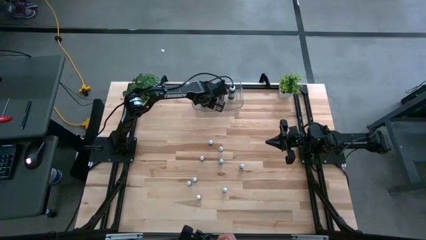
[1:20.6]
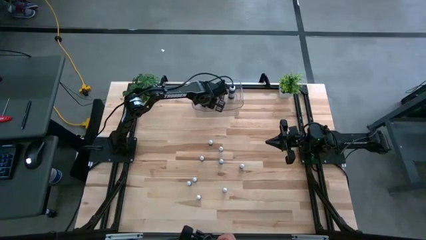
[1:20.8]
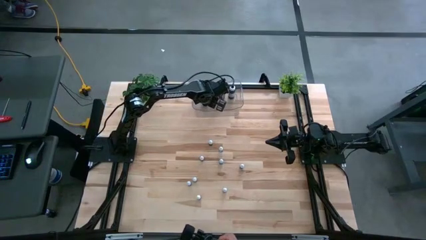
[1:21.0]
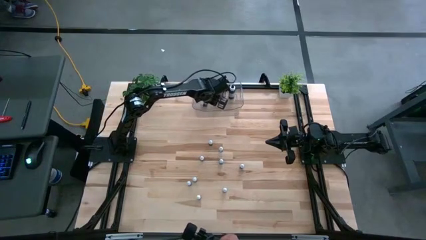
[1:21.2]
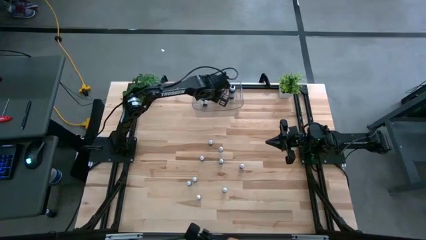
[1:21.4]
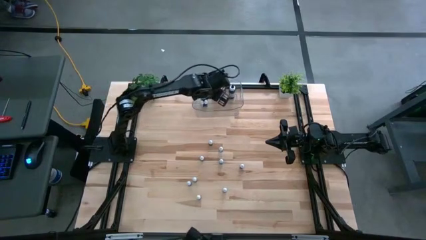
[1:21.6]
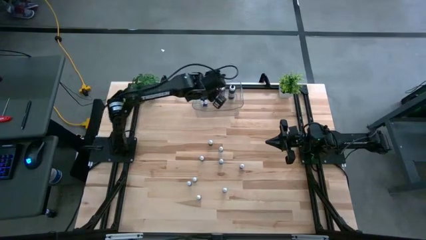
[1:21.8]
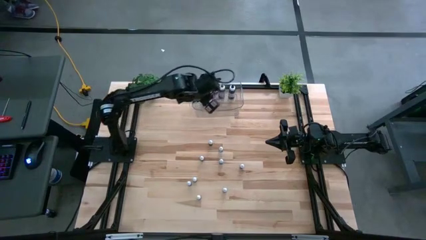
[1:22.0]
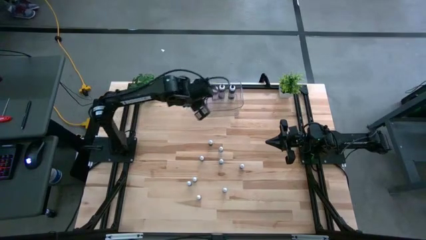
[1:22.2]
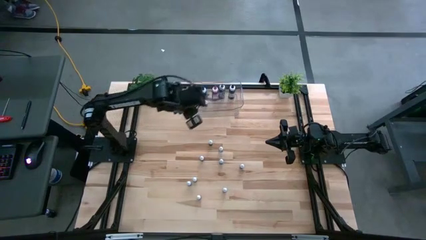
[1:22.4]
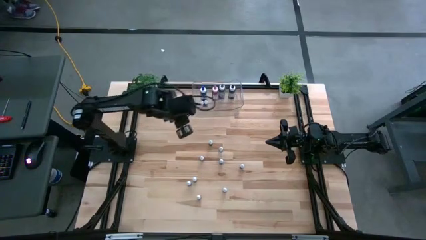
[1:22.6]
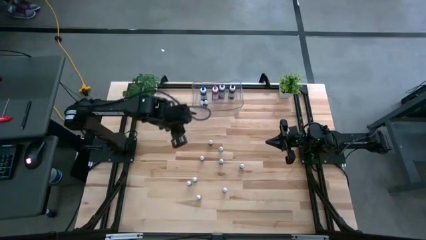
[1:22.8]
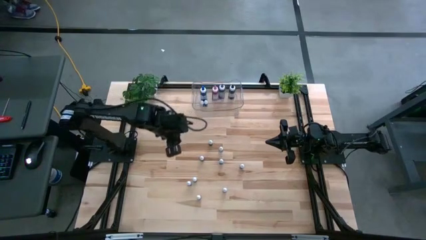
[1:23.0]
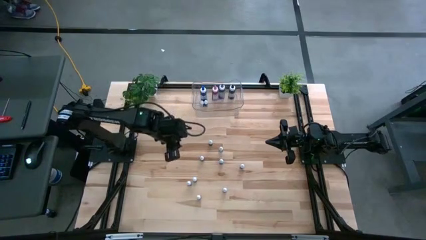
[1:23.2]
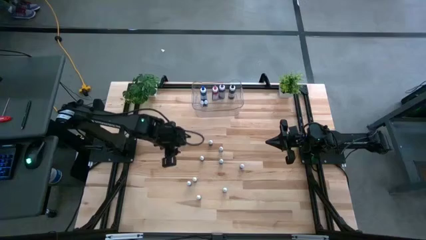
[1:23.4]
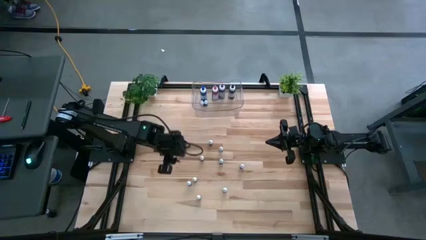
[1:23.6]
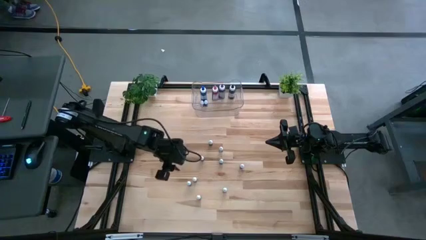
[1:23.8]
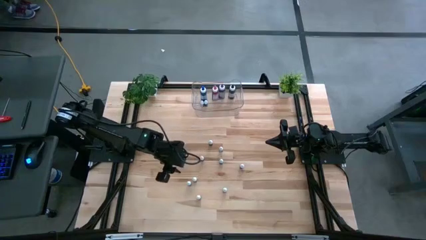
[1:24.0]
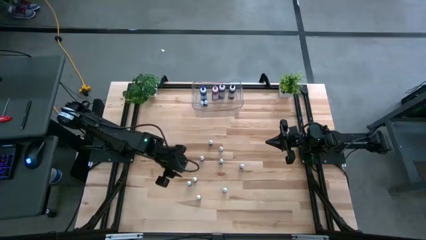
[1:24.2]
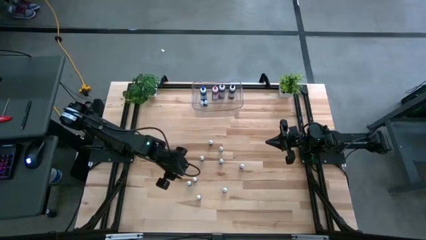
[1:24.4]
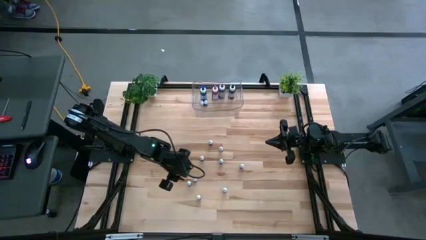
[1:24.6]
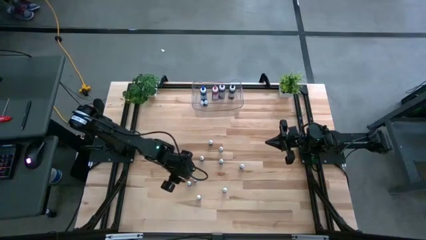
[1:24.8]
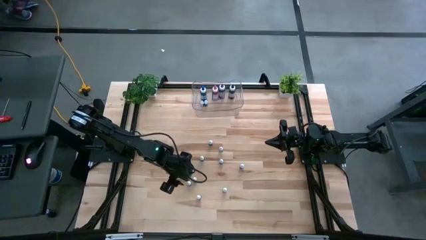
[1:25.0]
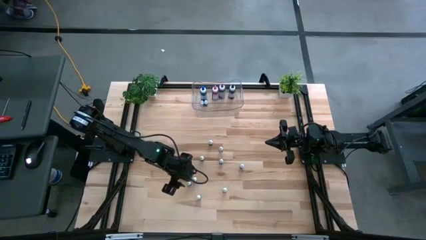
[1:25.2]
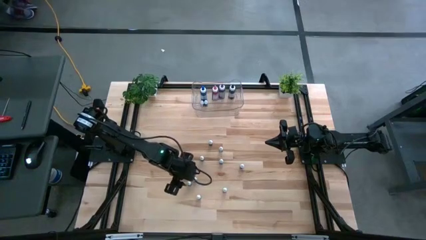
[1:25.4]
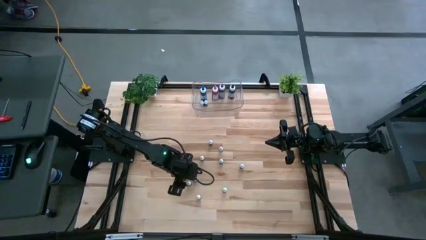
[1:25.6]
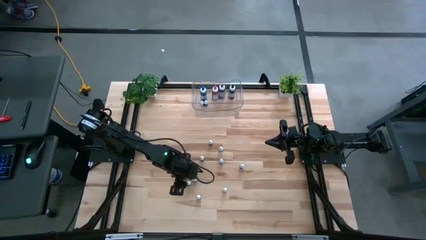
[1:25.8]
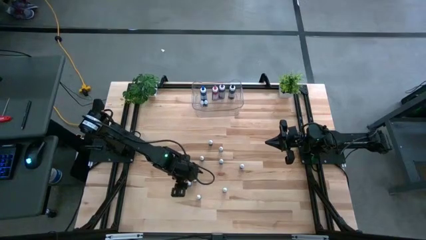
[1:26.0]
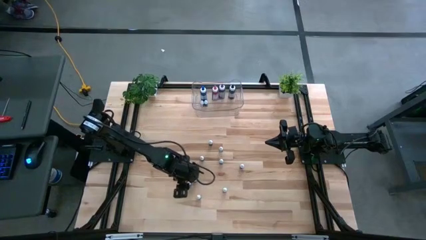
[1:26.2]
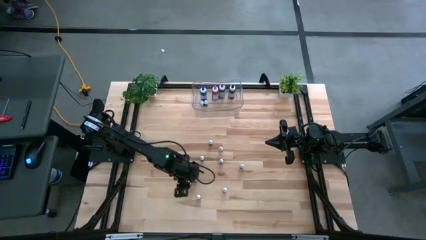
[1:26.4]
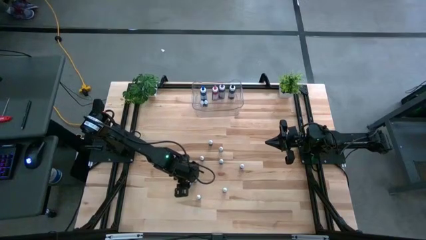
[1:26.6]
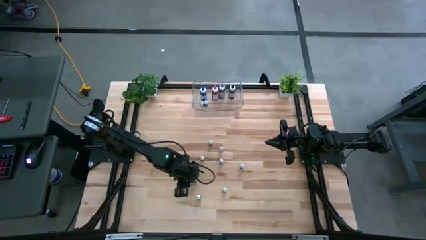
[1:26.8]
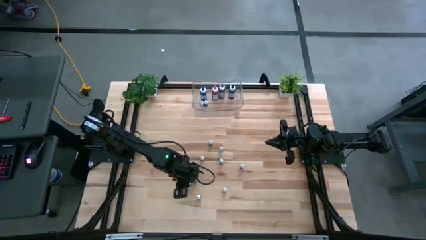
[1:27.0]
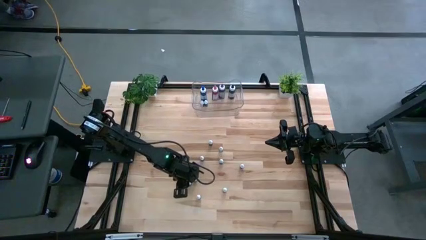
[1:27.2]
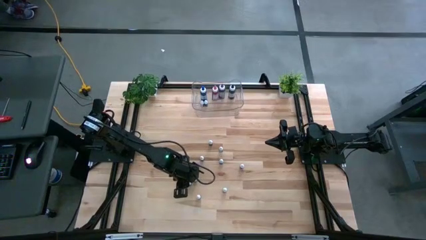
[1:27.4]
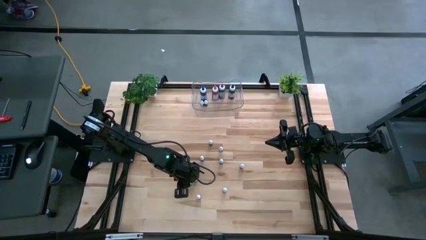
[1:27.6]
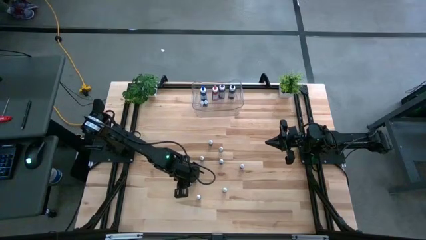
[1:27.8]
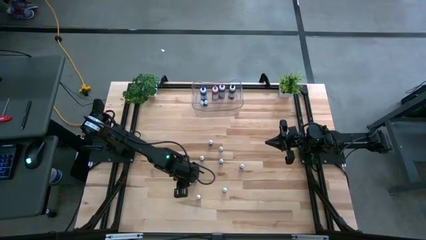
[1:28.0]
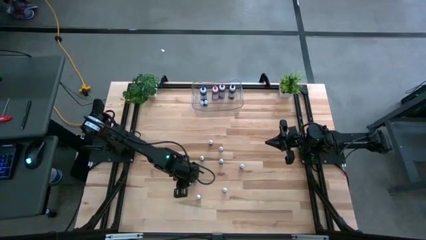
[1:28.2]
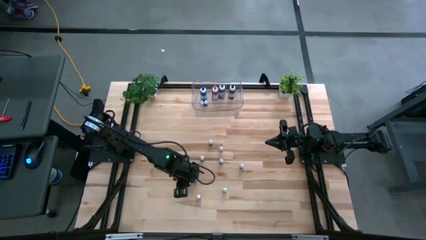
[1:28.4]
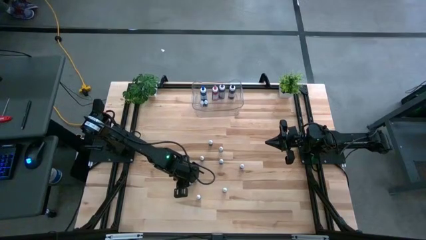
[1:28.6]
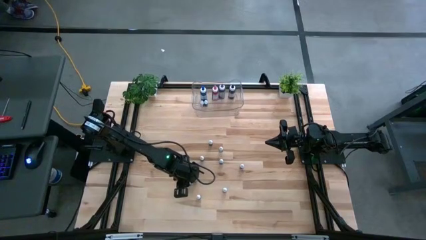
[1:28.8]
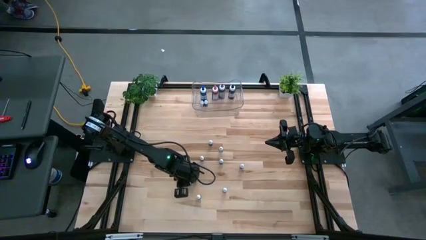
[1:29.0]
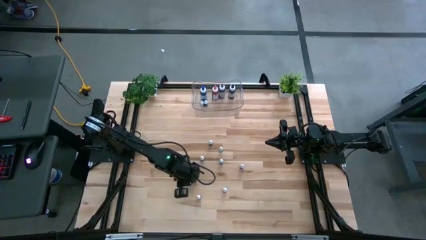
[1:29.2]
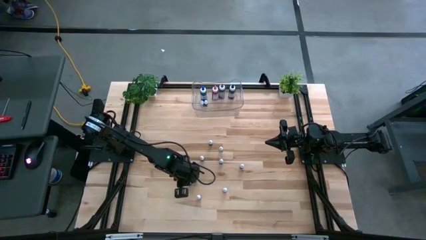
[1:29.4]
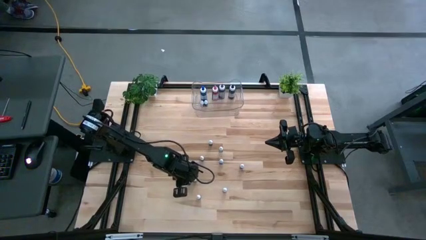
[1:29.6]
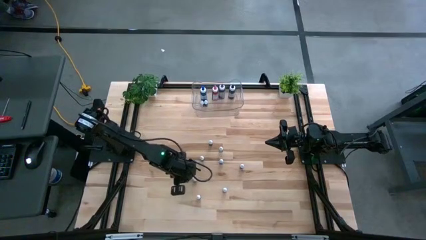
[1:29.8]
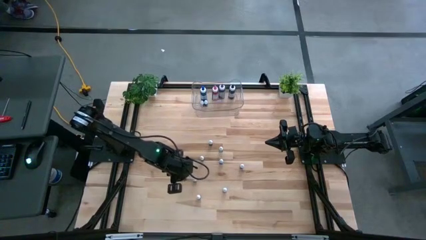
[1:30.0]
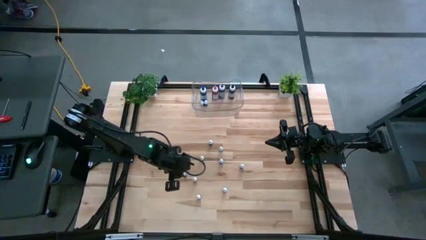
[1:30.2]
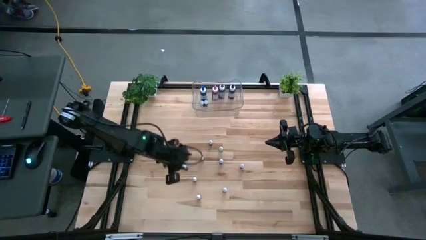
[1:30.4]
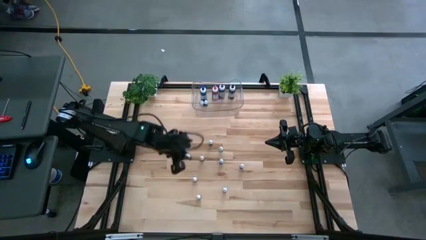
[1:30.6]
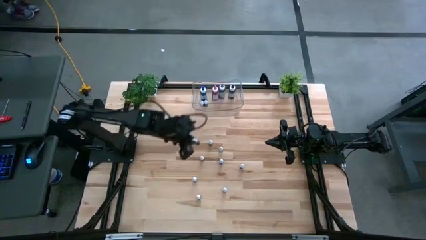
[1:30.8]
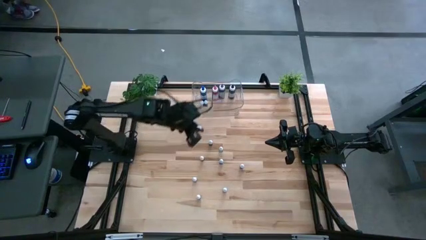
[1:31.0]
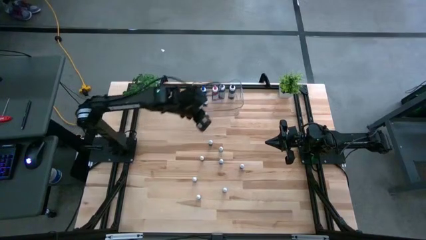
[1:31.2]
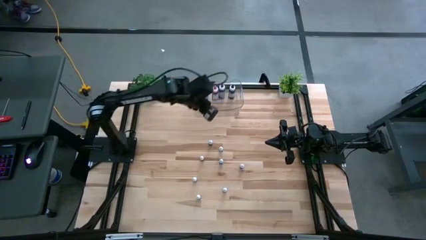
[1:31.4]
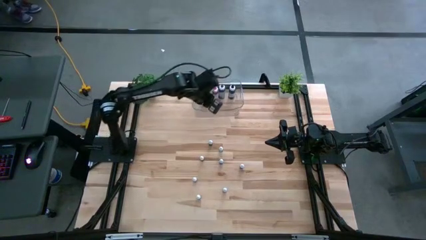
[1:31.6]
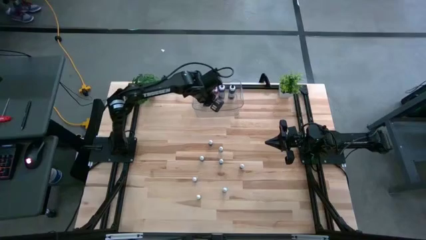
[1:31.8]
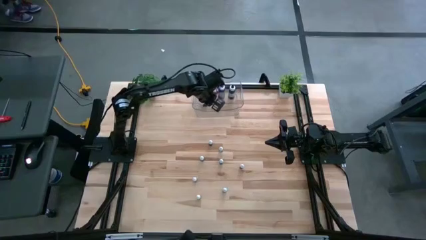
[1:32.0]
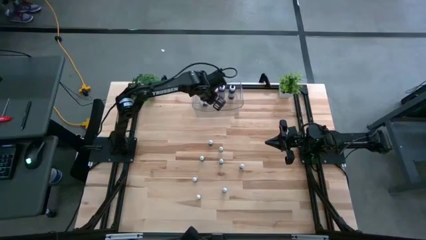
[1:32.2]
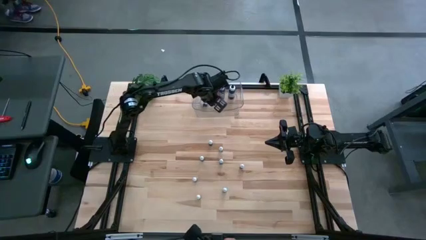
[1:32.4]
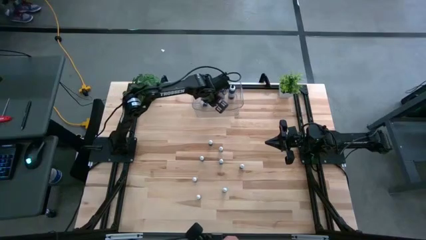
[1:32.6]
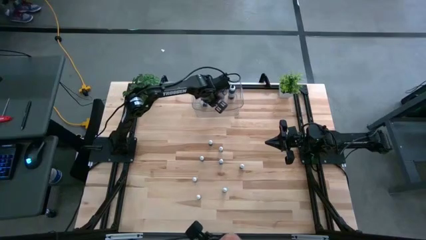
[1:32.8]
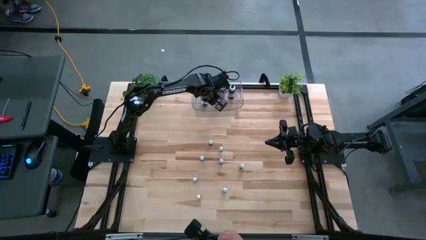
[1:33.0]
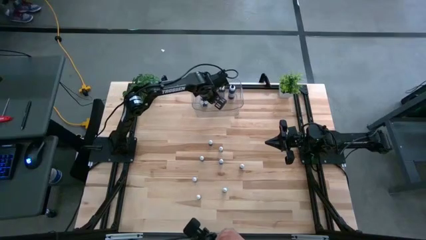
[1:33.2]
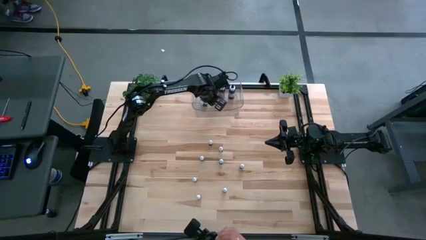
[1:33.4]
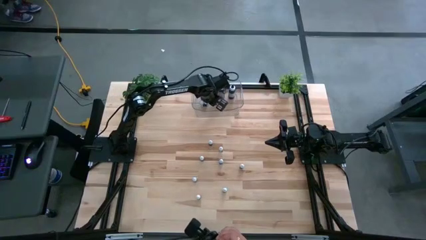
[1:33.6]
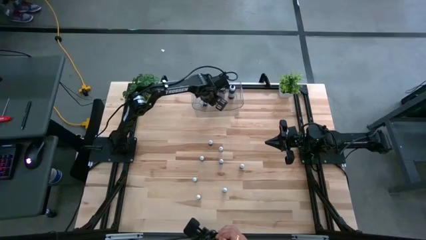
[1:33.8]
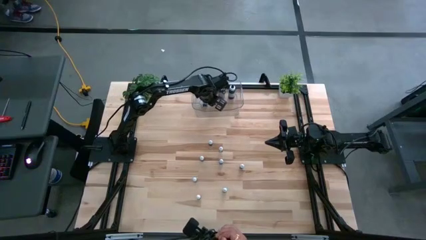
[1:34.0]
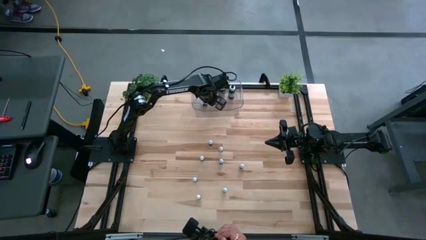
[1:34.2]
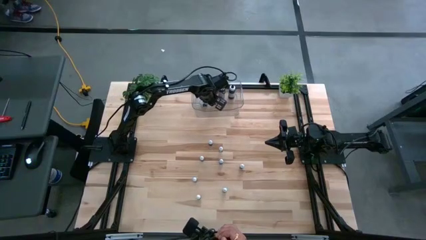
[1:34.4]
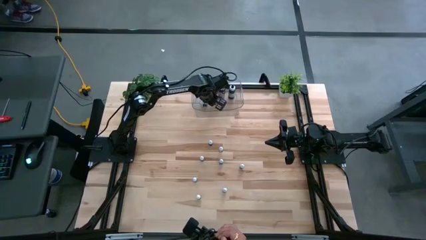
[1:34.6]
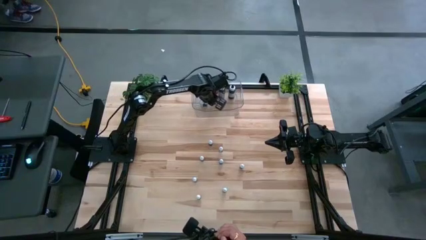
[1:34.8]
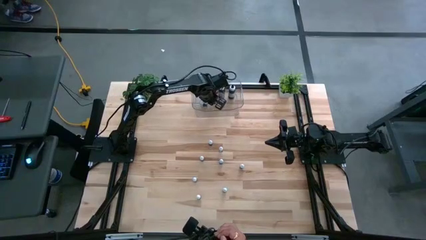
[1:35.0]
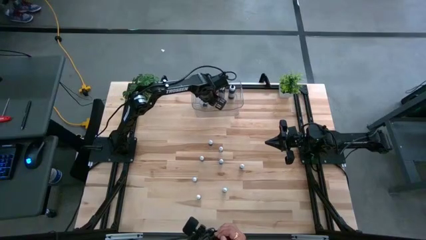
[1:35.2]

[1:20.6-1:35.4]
Task: Pick & Place food coloring
Put the bottom small red food coloring bottle into the transparent bin
